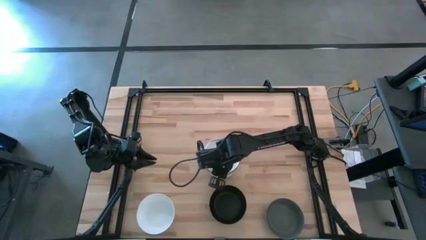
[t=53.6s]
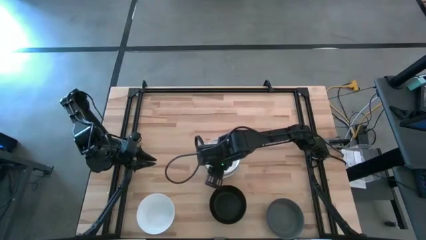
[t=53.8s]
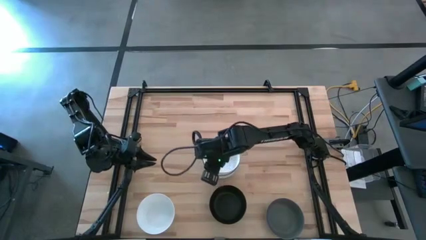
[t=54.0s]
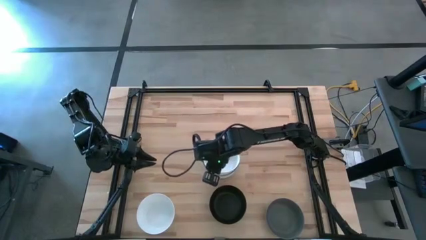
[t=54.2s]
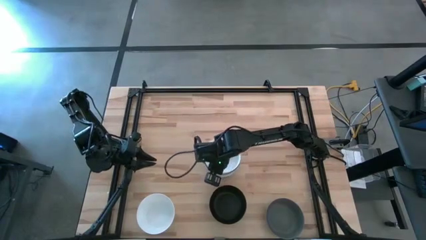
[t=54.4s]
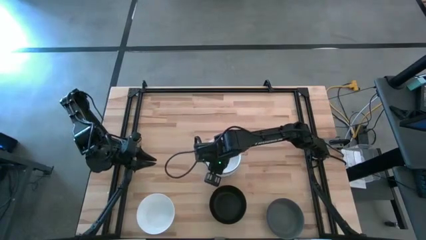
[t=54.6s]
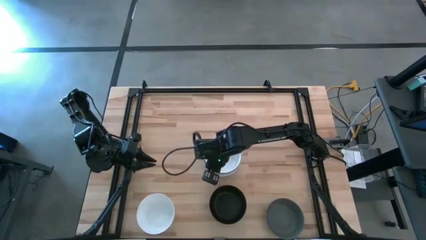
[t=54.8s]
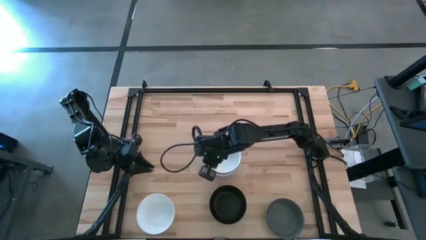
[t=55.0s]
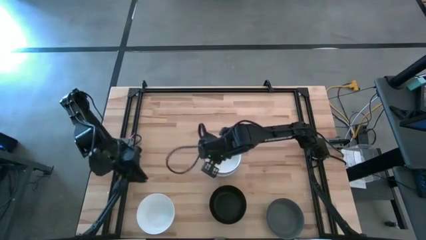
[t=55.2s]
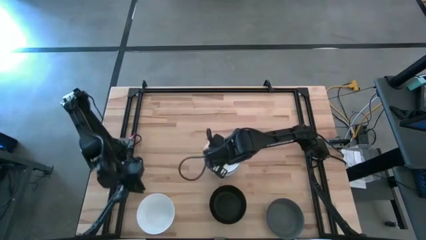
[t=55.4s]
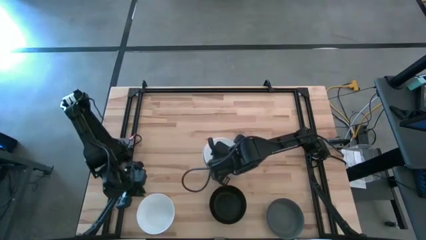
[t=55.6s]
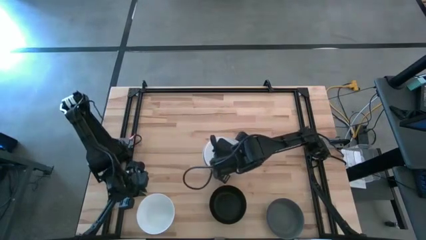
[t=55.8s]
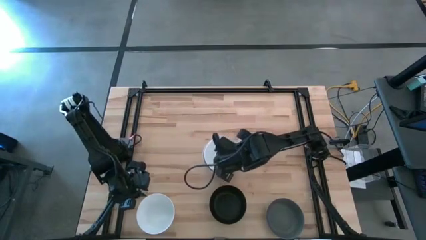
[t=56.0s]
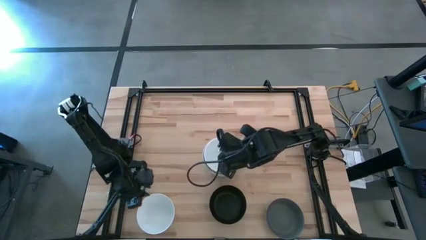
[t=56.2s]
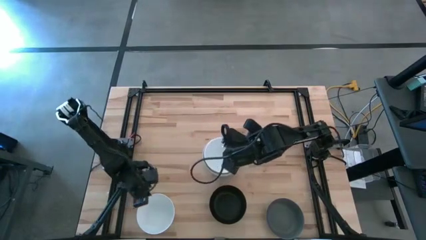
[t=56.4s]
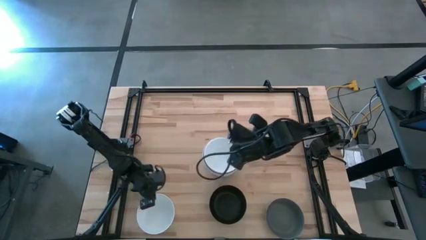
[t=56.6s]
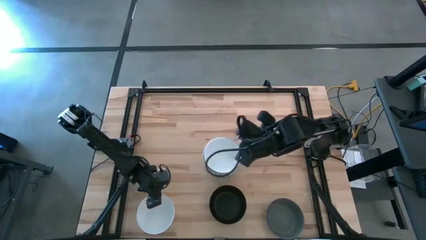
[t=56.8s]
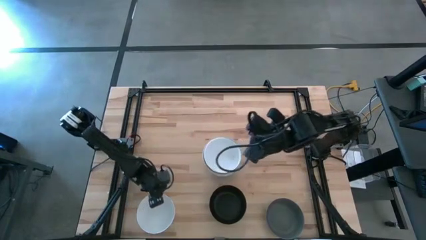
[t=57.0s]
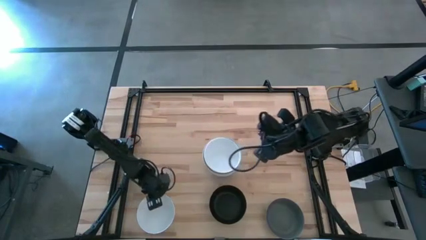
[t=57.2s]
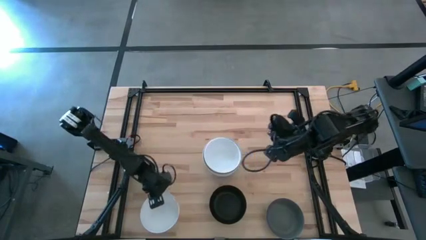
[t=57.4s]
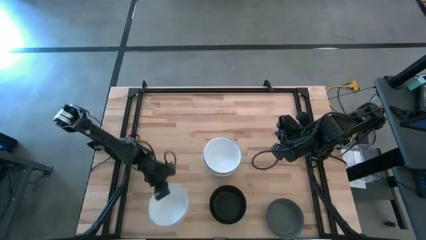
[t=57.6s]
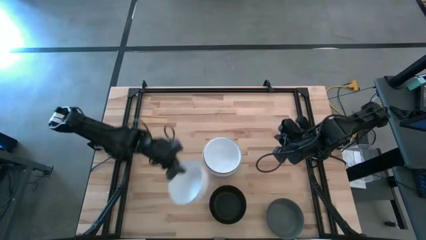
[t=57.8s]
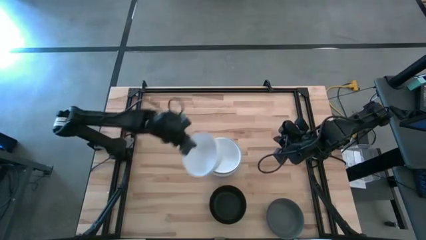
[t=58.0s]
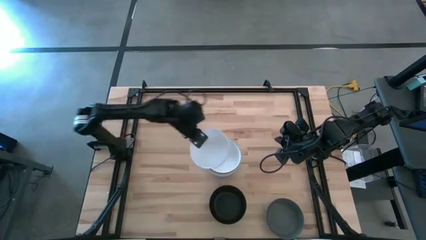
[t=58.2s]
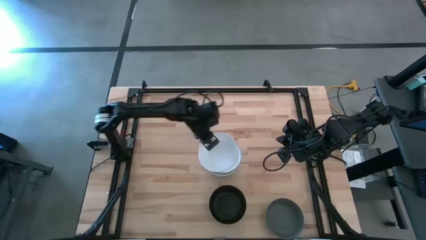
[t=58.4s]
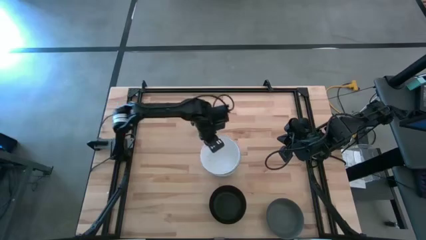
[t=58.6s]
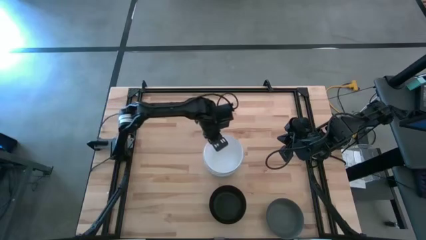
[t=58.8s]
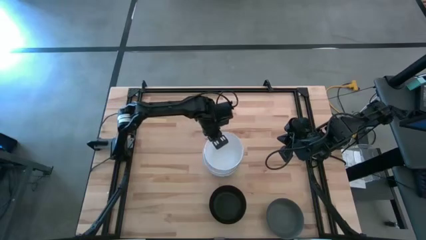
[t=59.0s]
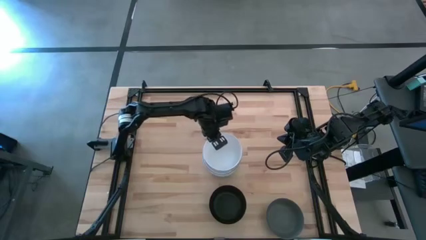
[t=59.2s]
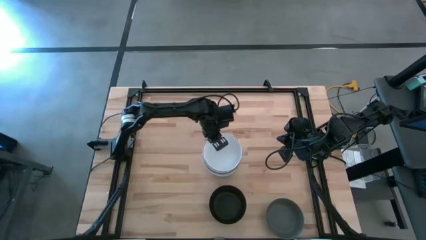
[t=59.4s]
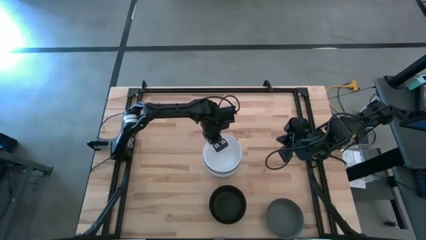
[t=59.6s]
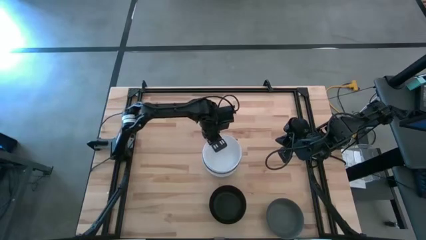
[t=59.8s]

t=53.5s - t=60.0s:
Task: Nest bowls inside each other
Stack the white bowl on the white bowl

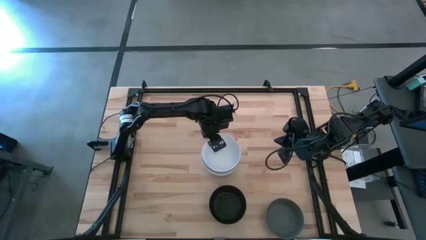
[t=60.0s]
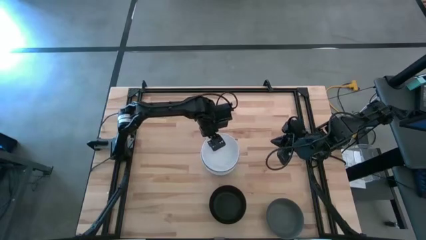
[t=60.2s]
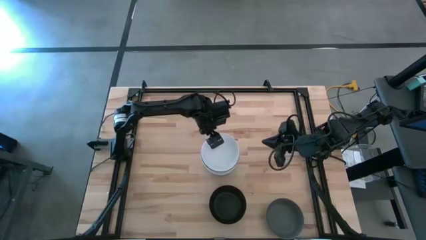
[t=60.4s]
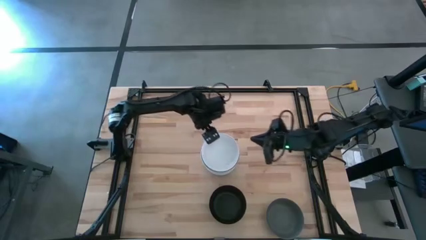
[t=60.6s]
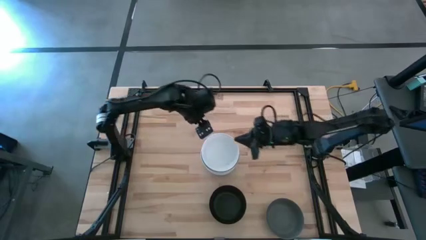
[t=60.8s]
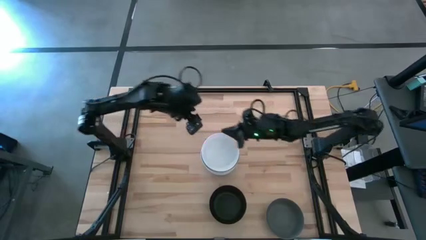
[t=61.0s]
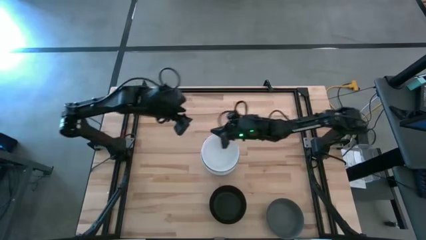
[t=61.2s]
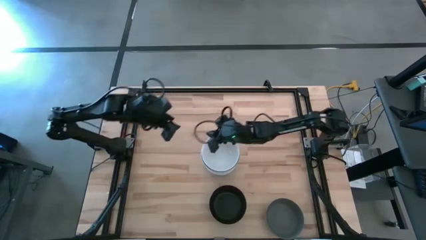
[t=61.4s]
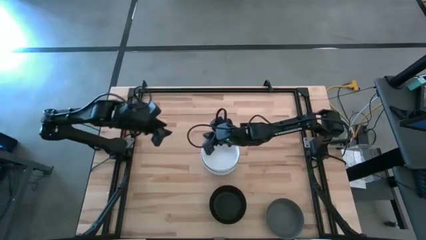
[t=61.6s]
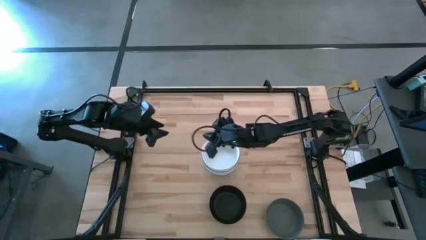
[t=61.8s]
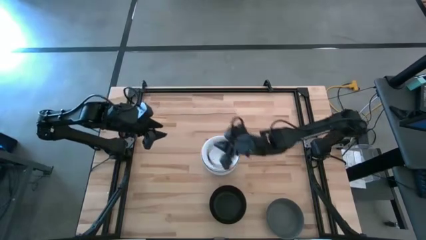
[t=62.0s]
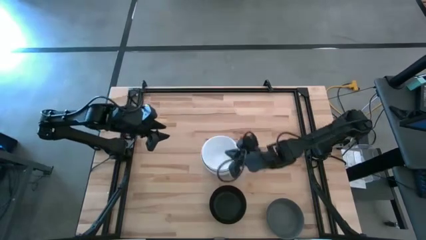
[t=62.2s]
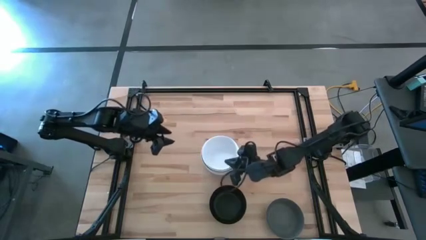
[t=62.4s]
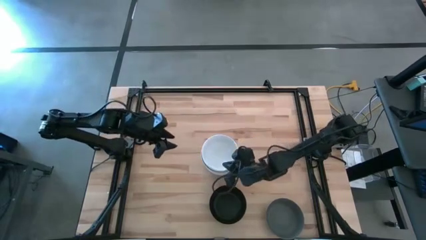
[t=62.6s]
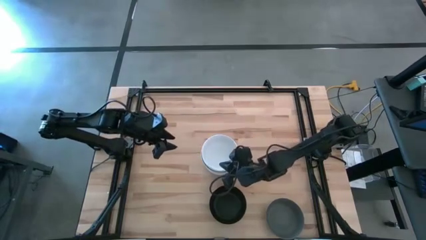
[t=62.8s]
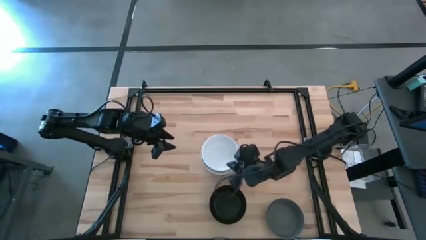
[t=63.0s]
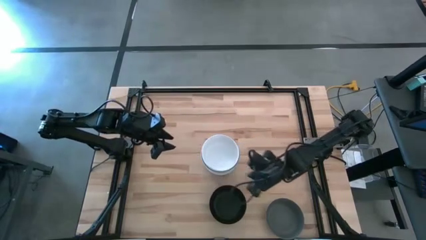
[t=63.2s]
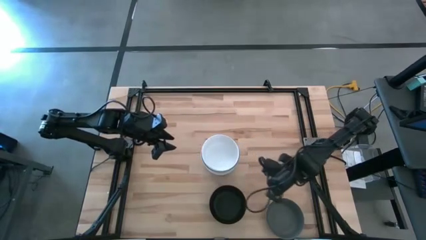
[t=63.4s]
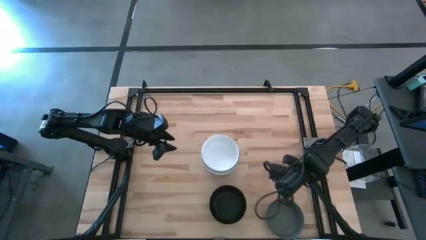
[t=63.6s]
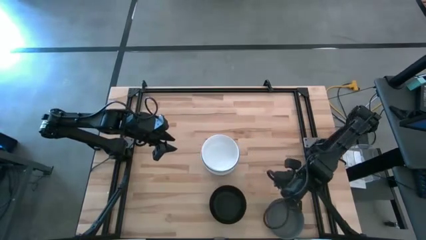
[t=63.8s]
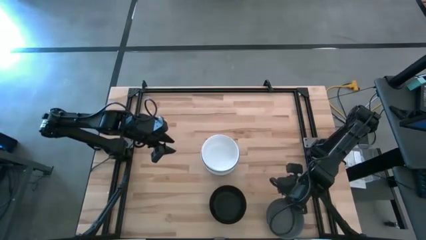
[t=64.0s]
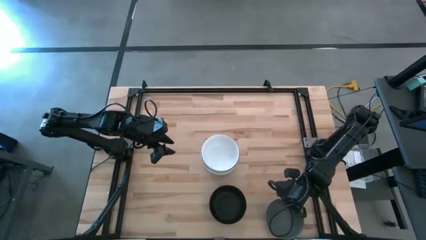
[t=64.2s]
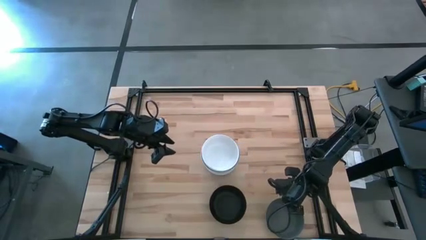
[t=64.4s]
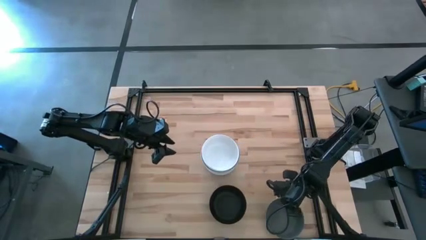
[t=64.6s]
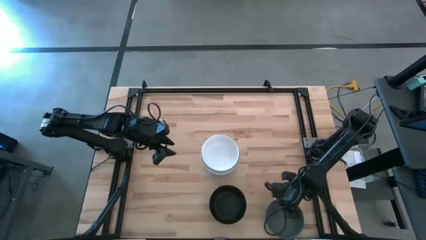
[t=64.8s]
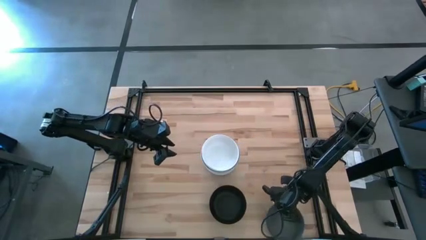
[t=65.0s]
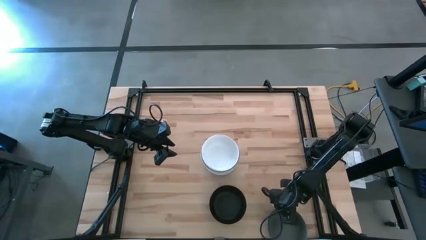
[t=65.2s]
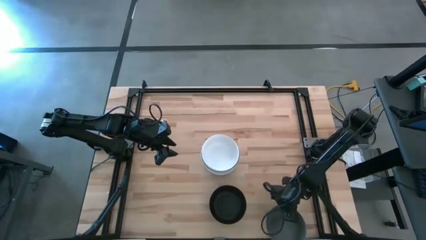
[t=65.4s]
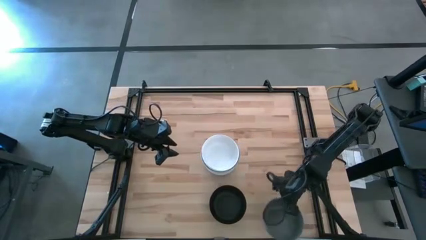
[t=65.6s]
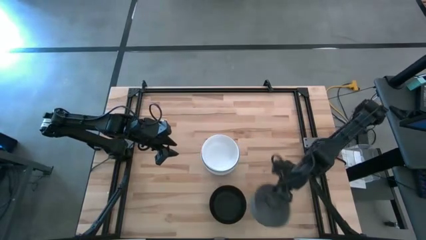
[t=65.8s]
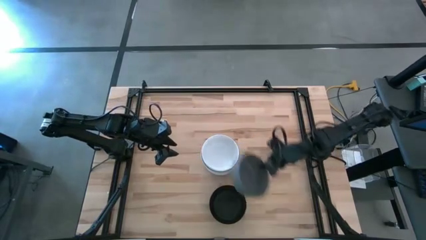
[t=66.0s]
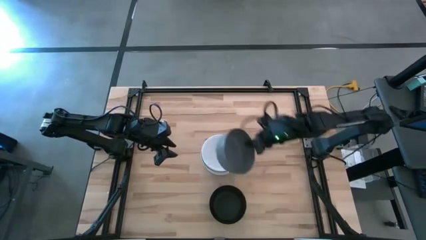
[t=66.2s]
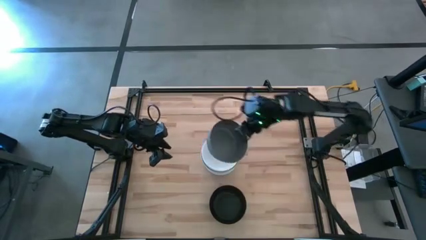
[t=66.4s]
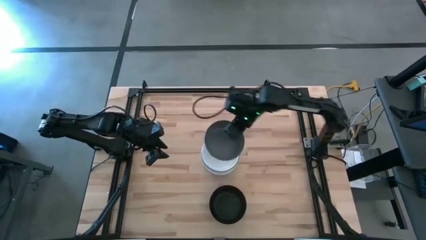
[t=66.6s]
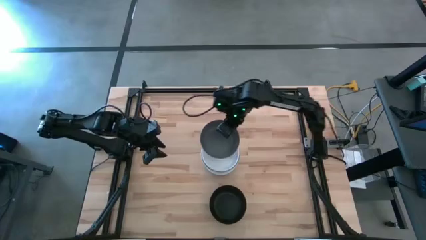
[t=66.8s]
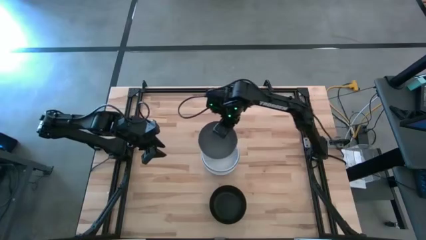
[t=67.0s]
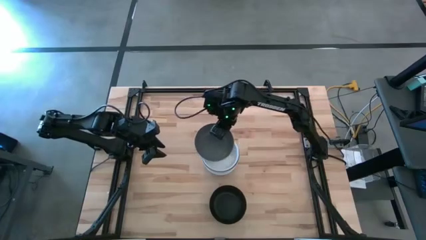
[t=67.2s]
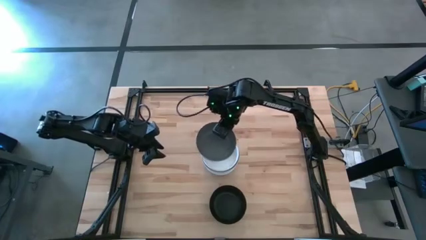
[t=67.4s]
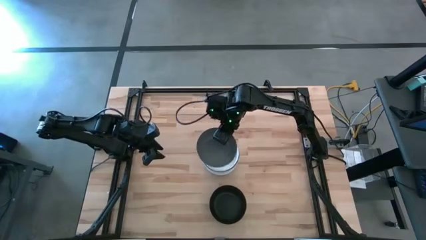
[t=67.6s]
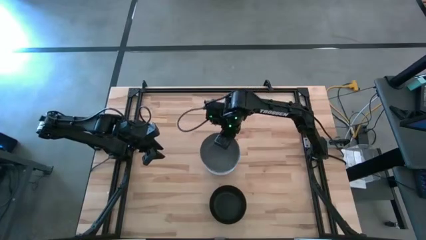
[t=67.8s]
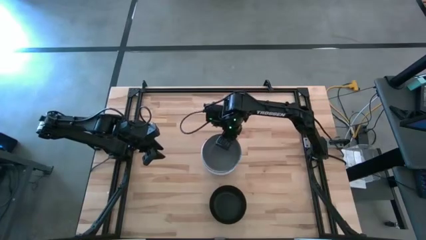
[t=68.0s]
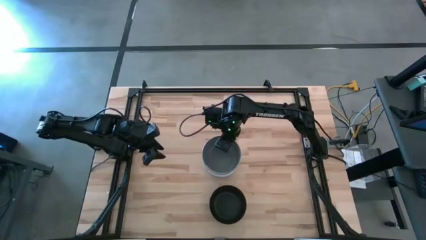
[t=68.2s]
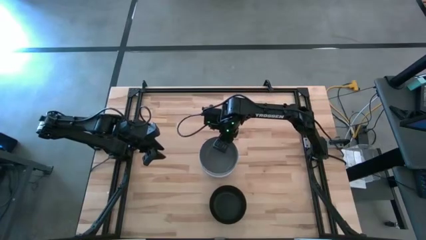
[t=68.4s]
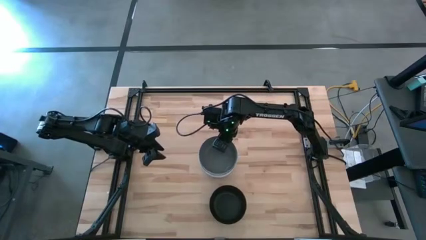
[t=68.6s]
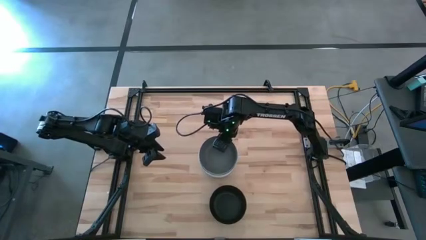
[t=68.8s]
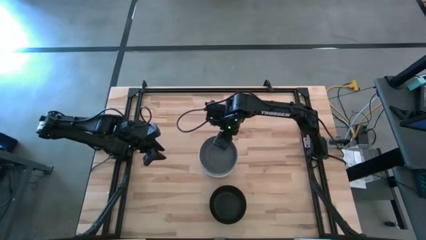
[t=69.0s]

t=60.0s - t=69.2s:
Stack the gray bowl on the white bowl

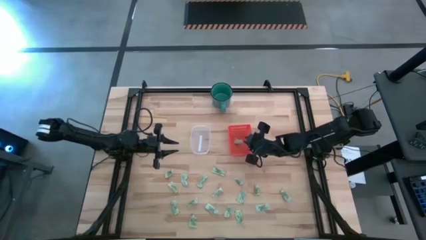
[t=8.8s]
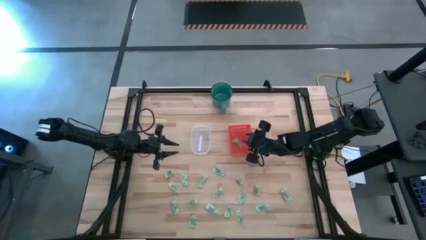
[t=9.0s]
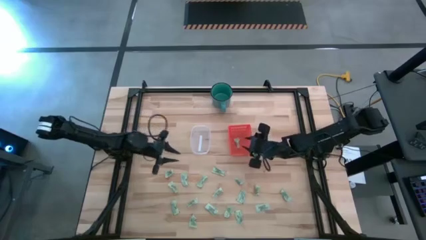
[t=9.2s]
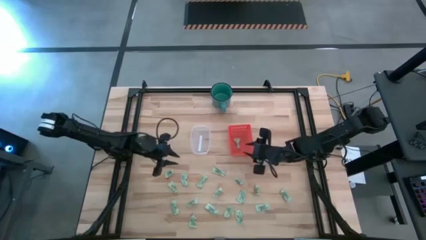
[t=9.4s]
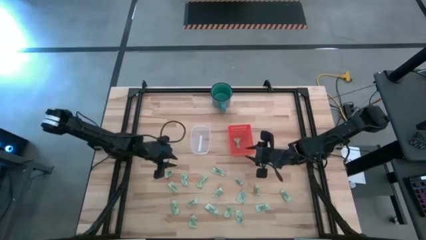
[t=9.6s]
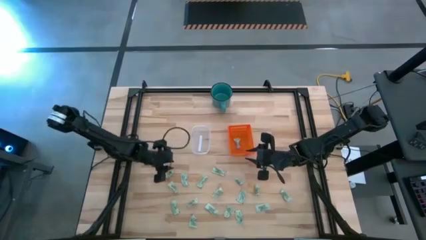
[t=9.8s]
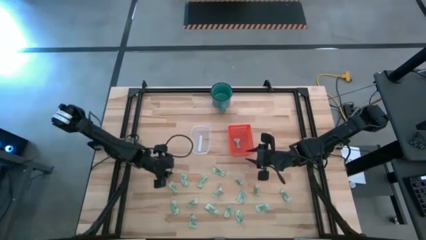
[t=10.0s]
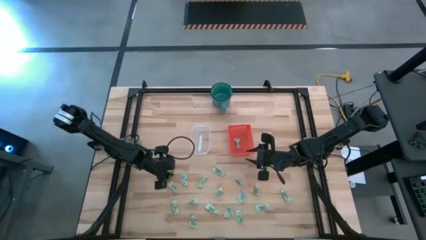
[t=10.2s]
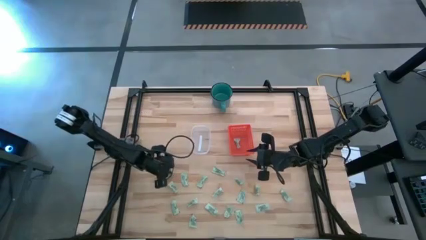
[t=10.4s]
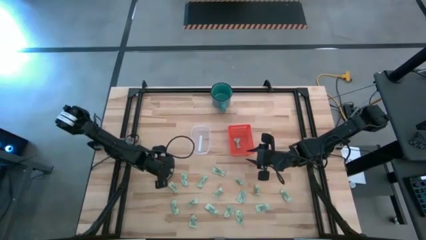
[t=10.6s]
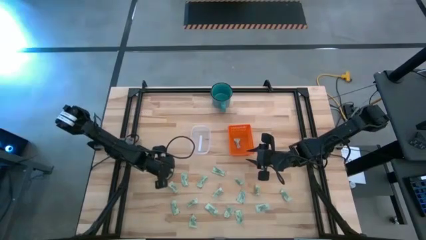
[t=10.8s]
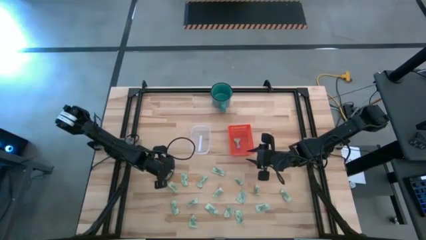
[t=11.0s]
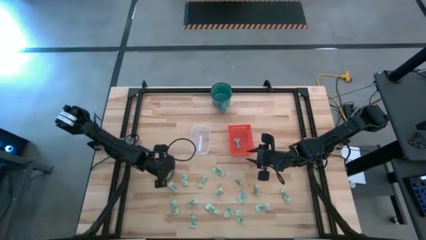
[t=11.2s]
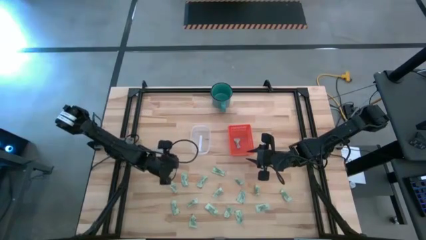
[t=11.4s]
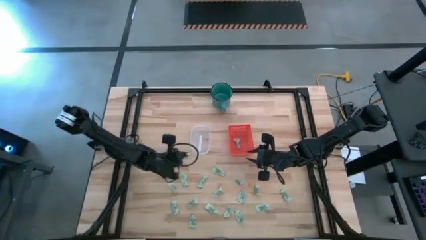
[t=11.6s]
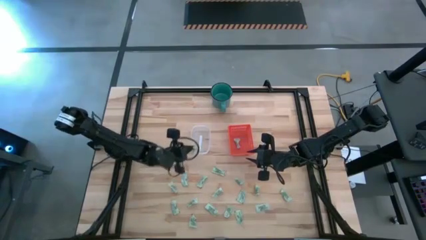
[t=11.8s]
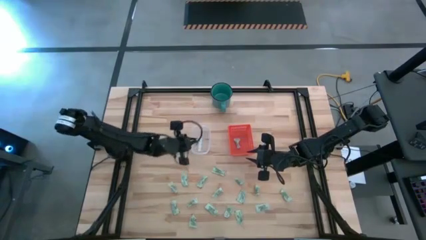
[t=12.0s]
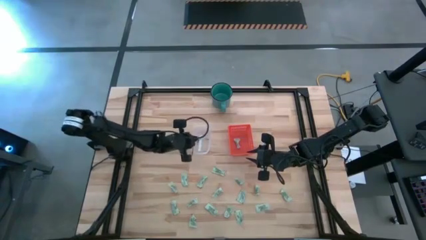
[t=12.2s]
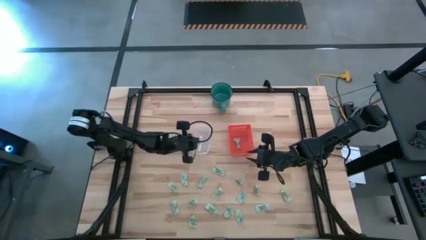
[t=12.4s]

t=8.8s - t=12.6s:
Task: Pick and place items into bin
Put the stevia packet into the transparent bin
